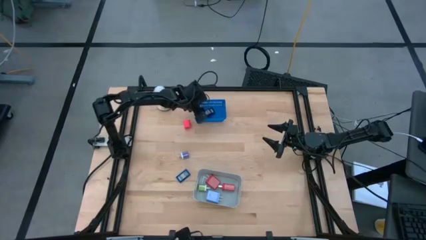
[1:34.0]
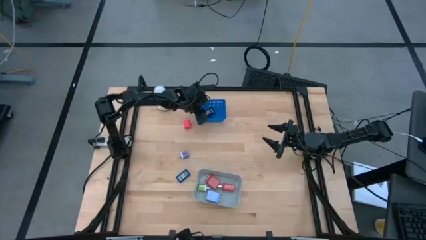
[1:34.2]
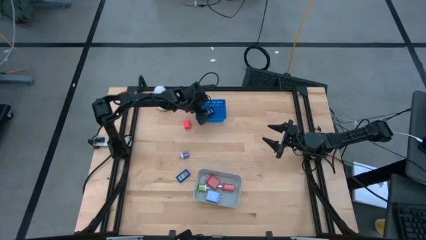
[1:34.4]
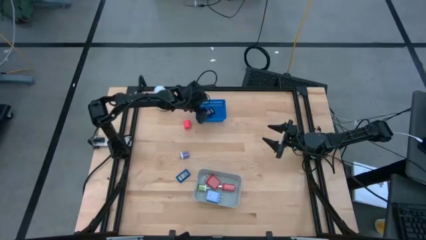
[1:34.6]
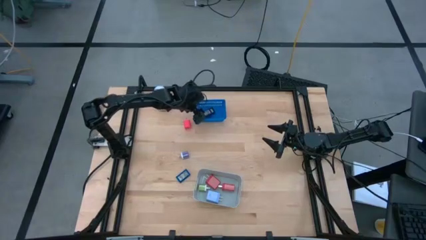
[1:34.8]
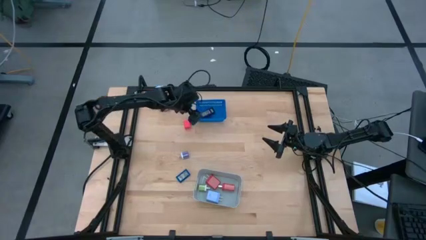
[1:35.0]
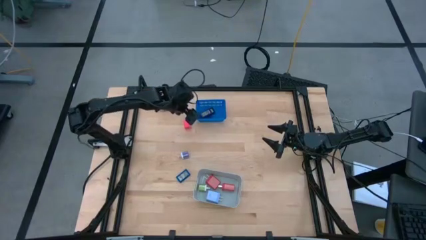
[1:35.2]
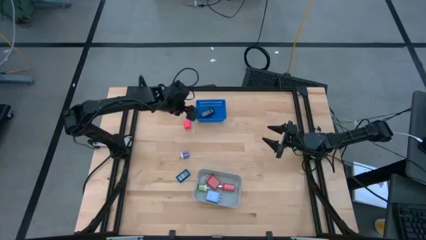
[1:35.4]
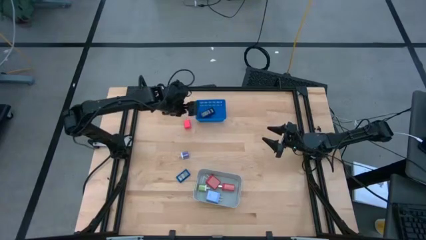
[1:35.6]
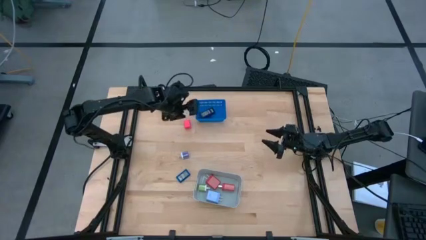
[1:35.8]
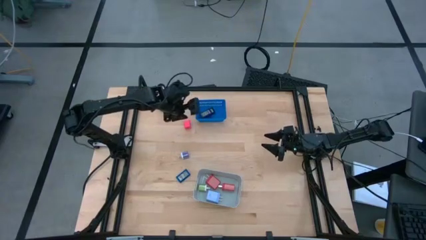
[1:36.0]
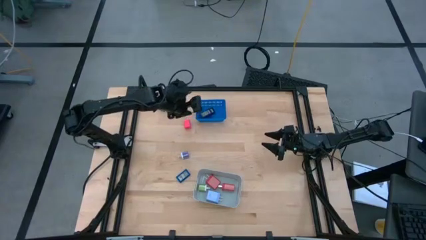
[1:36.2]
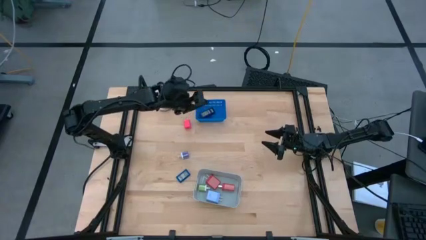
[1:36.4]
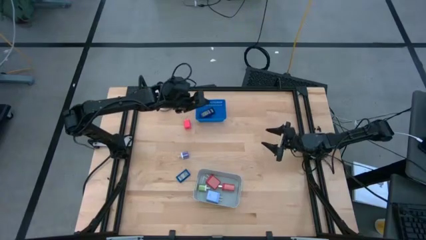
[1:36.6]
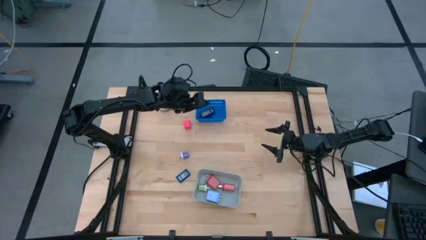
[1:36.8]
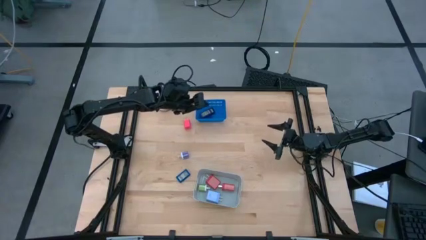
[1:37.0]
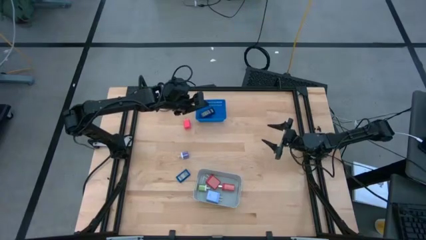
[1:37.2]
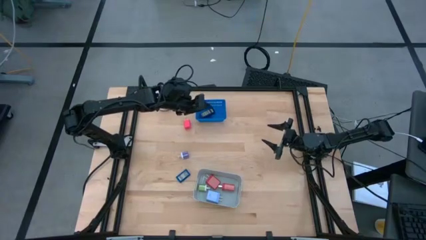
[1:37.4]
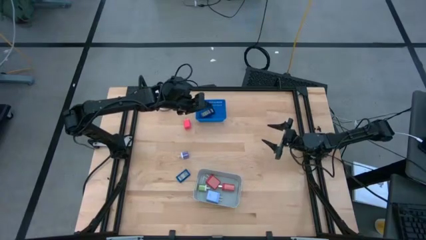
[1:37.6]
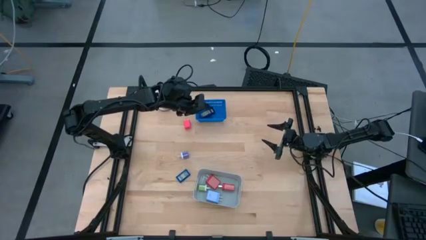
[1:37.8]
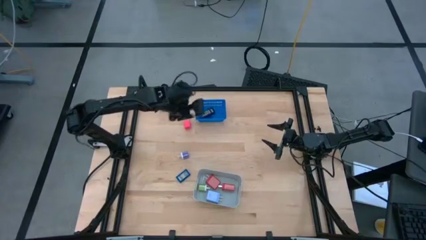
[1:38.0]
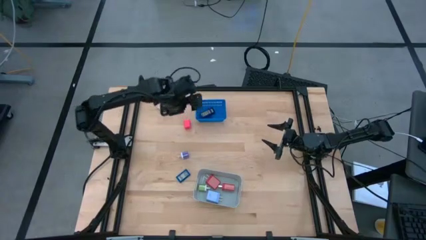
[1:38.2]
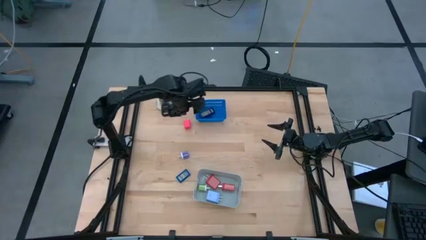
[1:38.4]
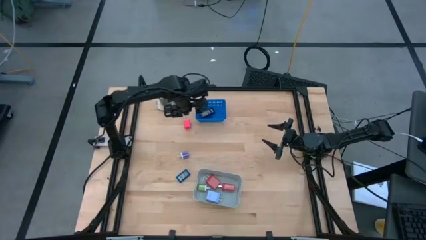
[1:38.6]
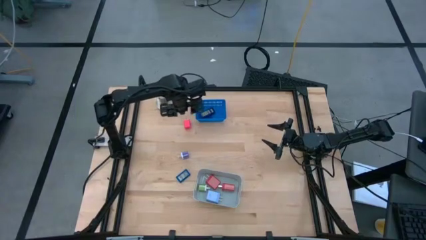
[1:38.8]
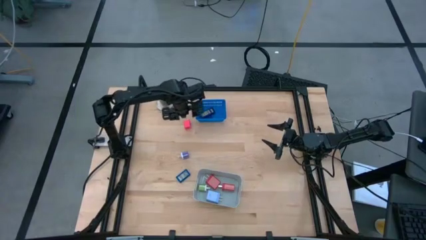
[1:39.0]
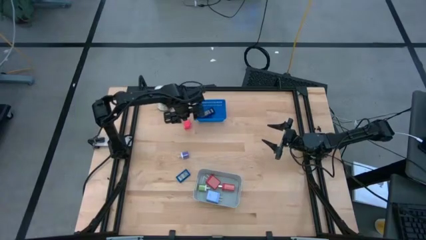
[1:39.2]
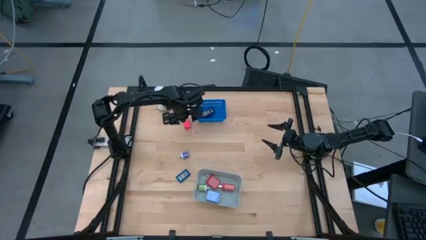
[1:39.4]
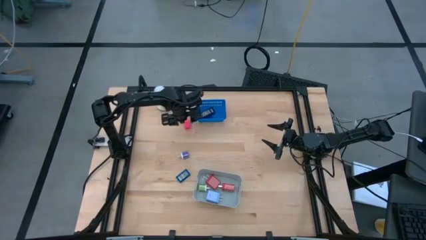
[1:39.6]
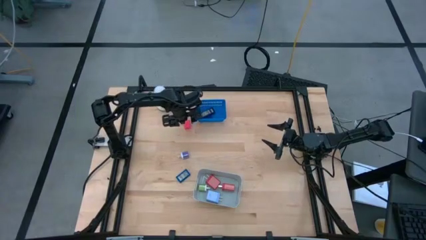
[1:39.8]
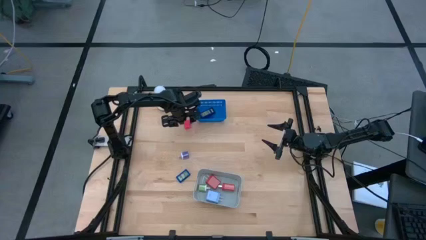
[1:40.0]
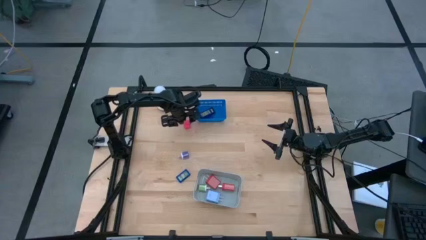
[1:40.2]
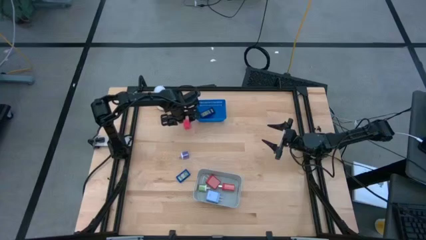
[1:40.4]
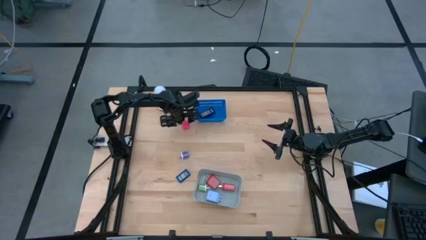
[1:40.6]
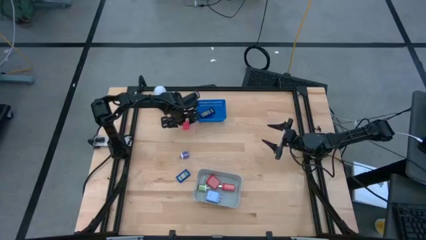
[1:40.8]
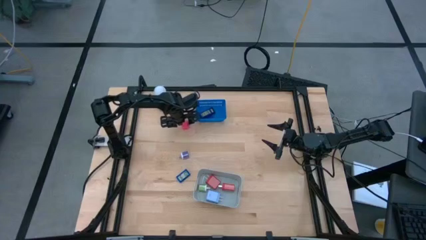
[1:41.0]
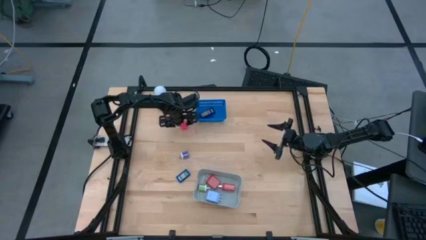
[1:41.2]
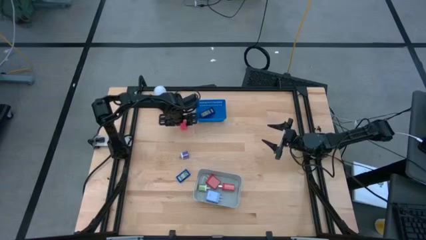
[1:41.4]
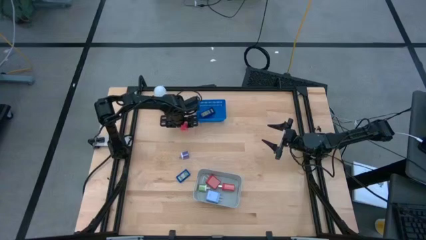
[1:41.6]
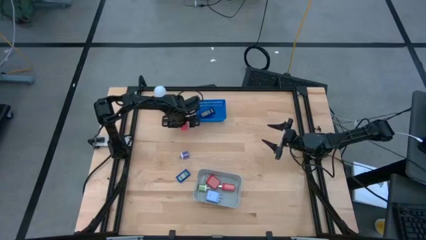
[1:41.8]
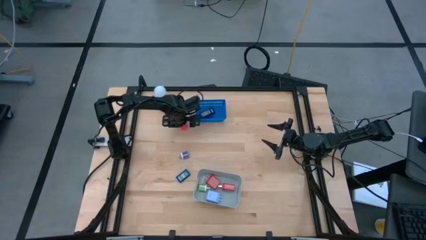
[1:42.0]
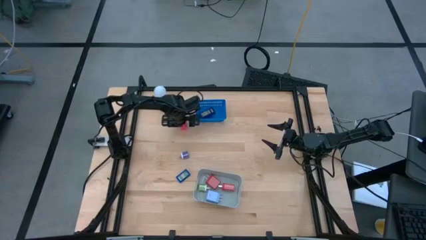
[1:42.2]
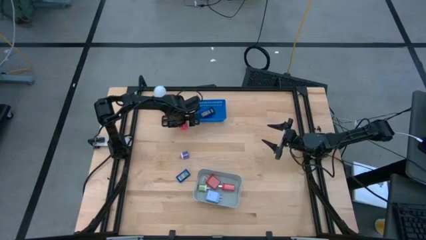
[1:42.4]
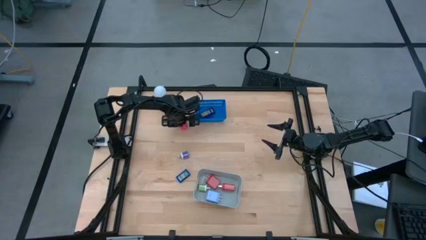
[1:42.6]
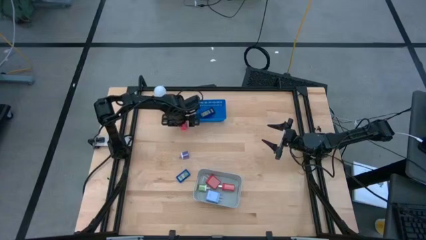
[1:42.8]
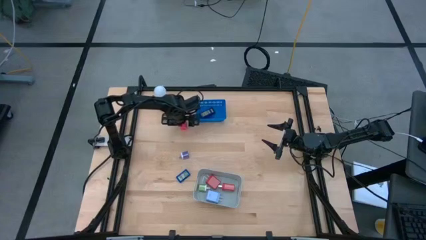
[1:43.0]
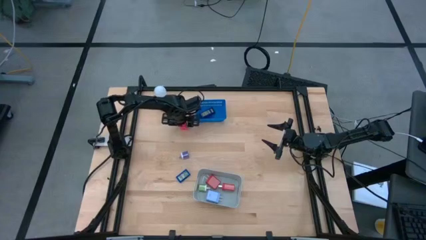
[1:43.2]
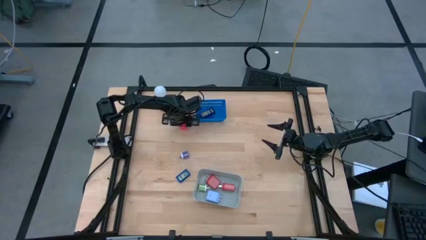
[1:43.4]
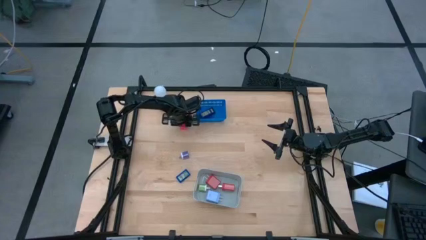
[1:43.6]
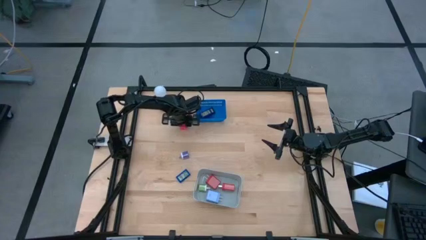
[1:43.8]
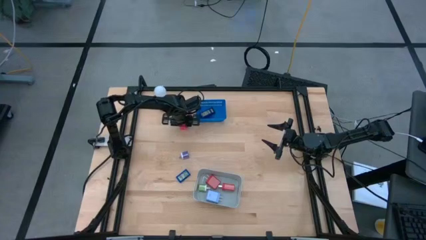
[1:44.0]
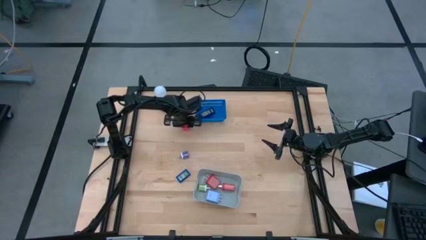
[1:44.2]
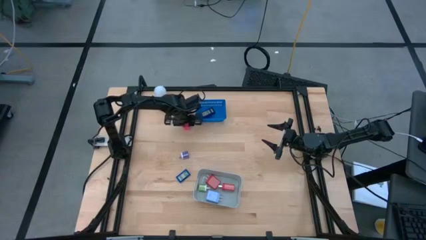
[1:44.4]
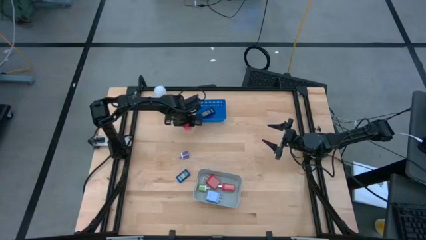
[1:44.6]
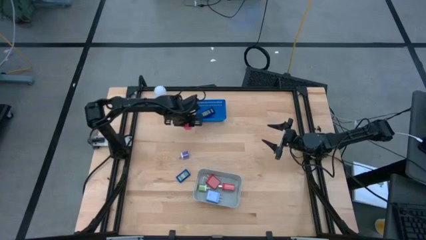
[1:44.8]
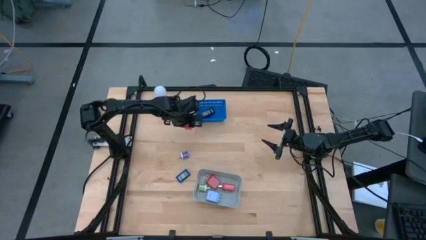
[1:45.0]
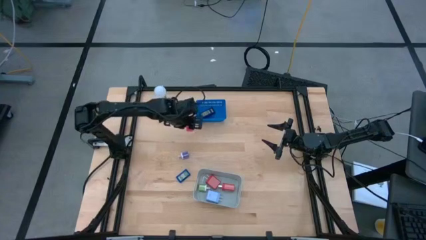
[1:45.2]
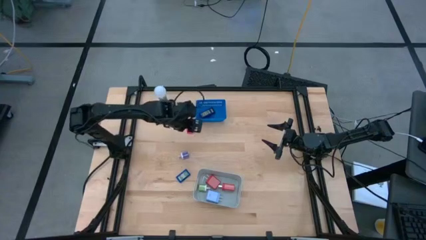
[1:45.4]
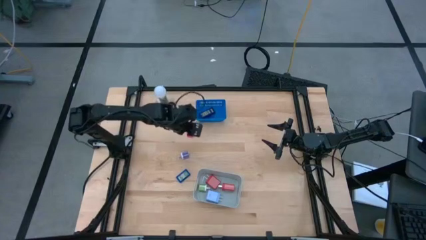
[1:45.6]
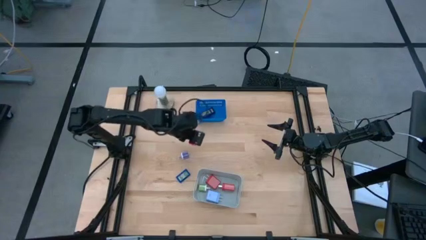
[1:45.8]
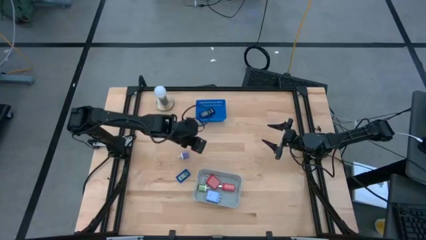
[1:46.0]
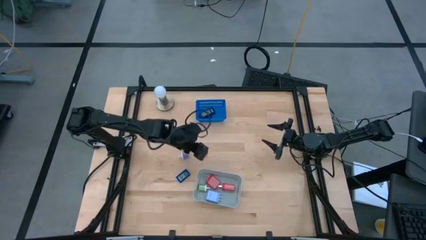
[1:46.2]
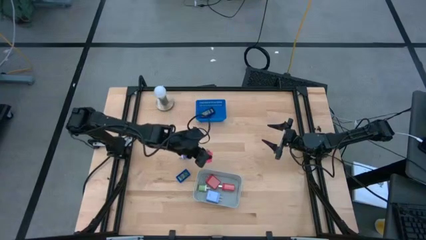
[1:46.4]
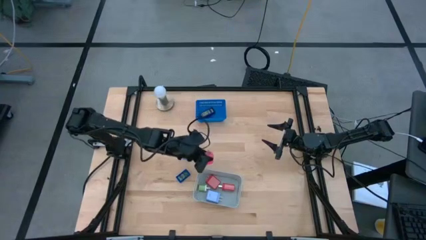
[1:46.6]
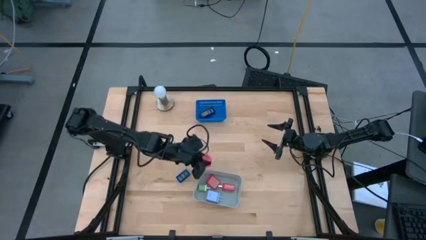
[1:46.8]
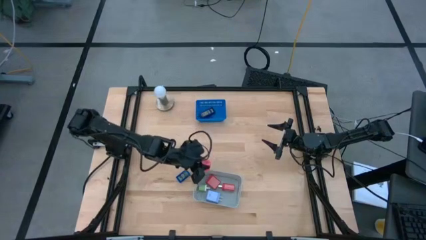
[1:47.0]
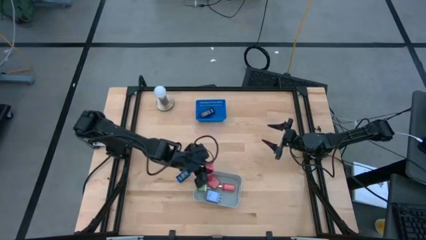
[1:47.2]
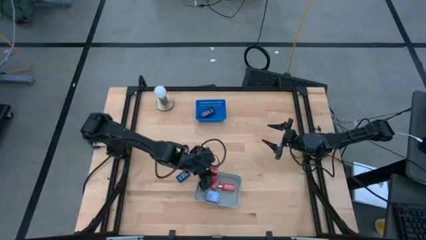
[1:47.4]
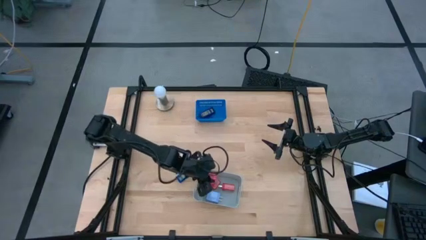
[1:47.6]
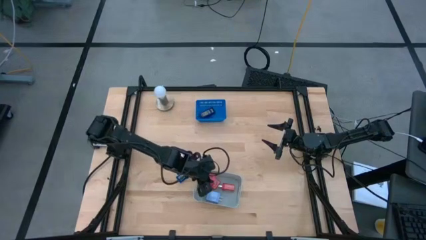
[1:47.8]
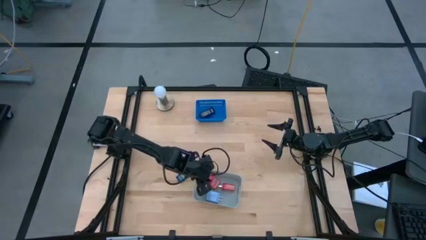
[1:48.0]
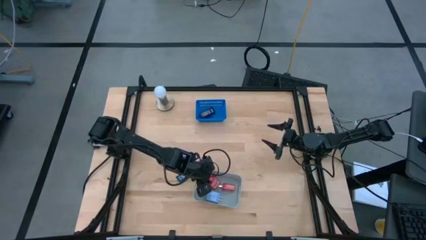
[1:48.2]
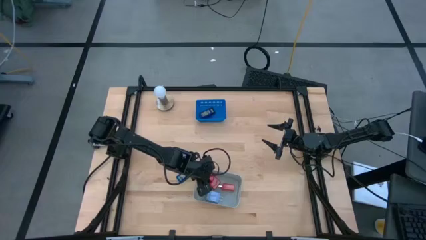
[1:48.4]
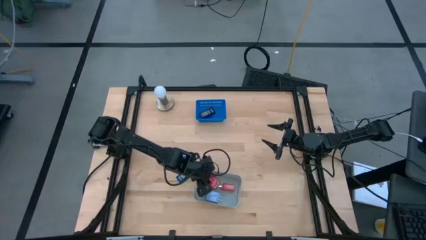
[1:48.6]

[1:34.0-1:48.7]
Task: Pick & Place Office items
Put the pink charger adapter into the gray bin
